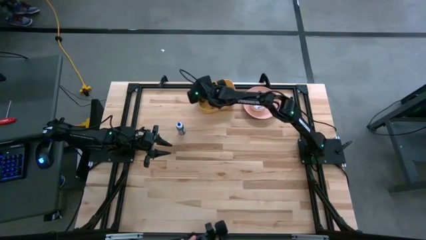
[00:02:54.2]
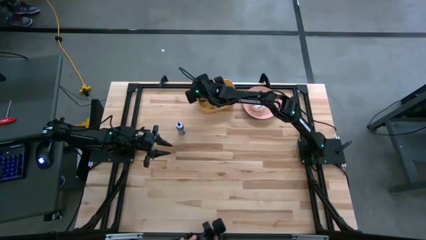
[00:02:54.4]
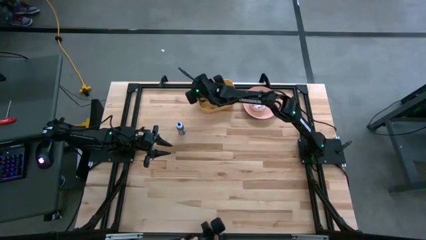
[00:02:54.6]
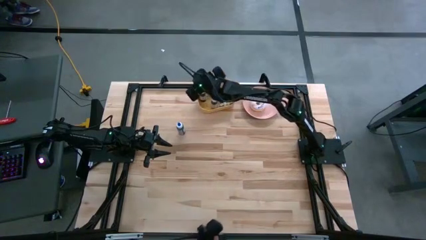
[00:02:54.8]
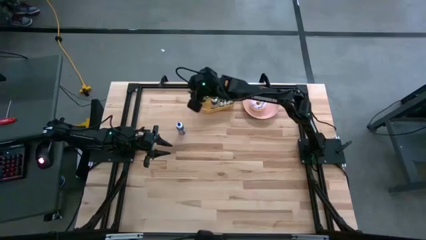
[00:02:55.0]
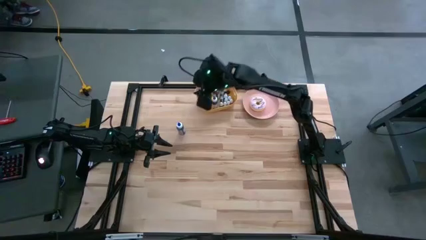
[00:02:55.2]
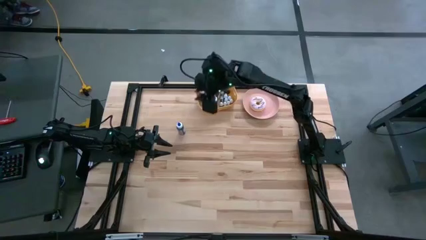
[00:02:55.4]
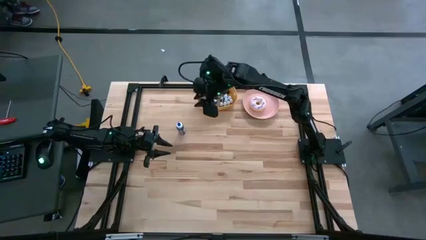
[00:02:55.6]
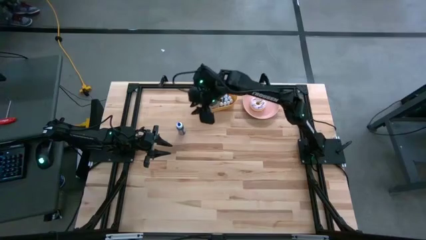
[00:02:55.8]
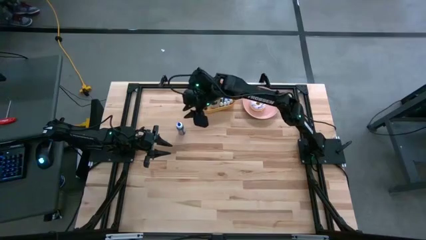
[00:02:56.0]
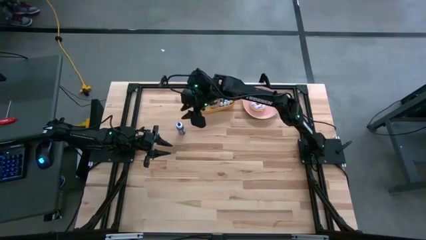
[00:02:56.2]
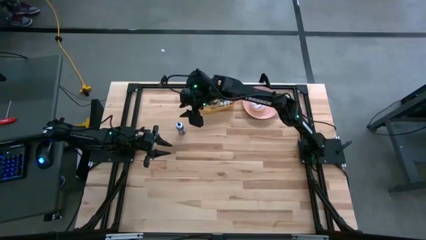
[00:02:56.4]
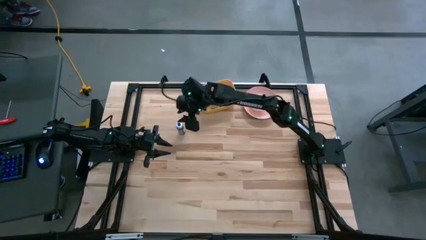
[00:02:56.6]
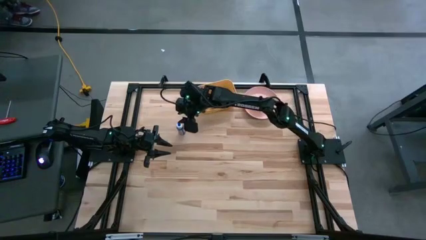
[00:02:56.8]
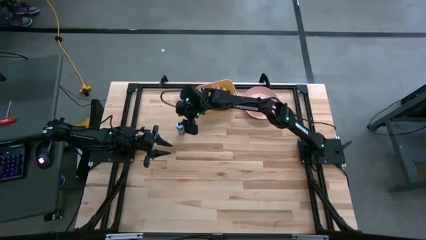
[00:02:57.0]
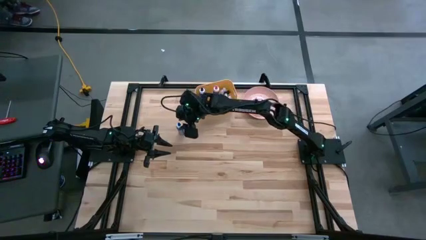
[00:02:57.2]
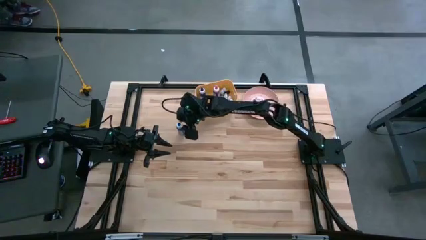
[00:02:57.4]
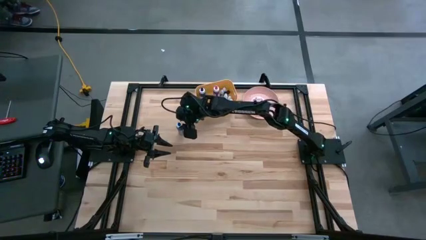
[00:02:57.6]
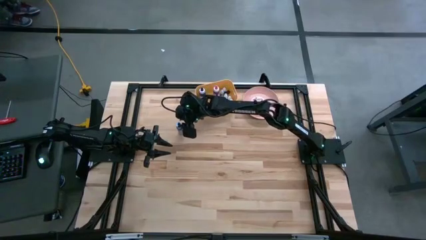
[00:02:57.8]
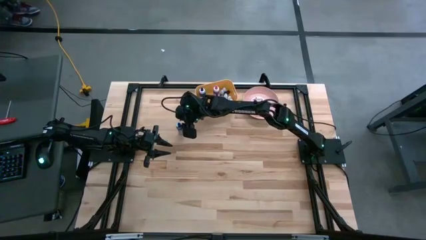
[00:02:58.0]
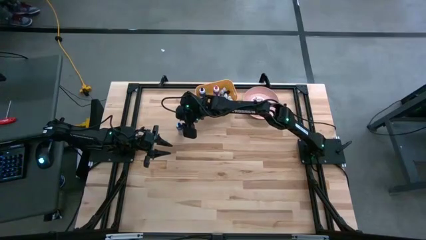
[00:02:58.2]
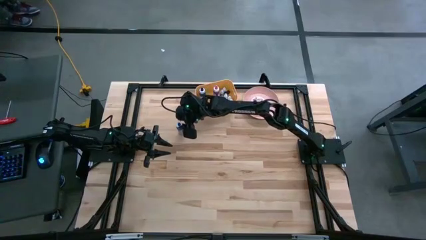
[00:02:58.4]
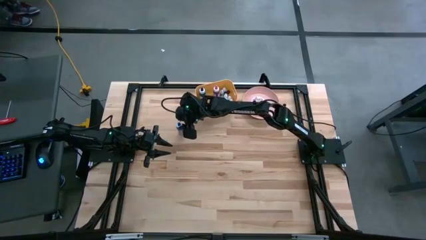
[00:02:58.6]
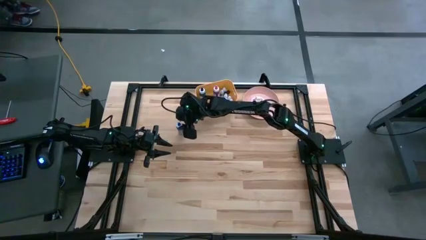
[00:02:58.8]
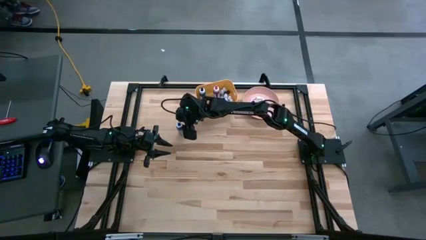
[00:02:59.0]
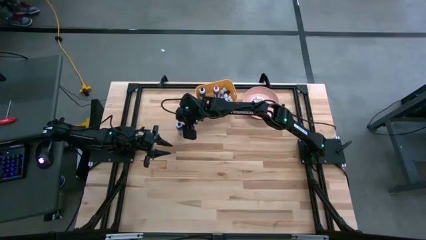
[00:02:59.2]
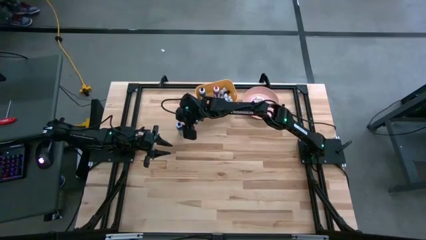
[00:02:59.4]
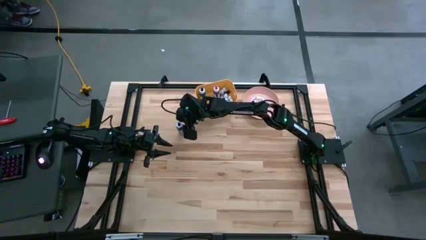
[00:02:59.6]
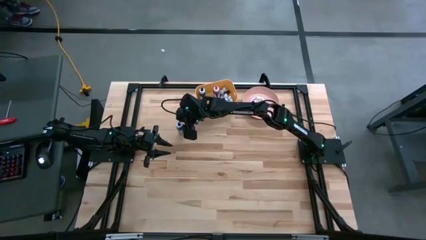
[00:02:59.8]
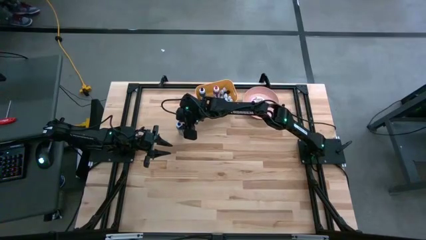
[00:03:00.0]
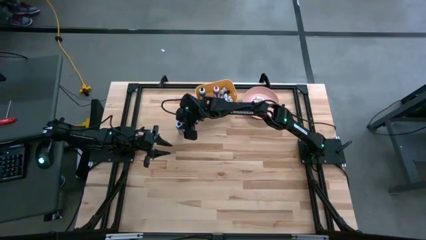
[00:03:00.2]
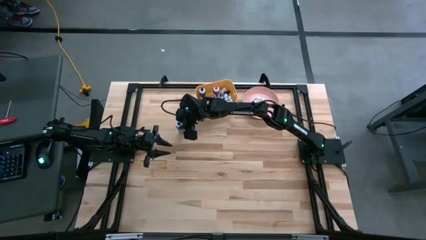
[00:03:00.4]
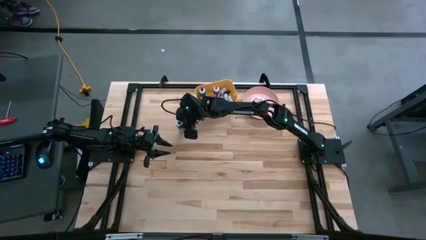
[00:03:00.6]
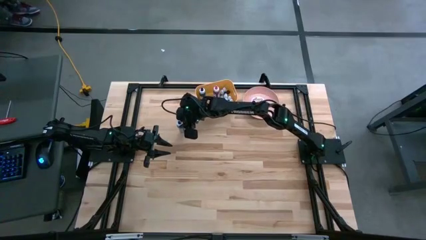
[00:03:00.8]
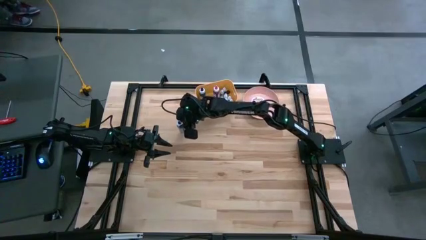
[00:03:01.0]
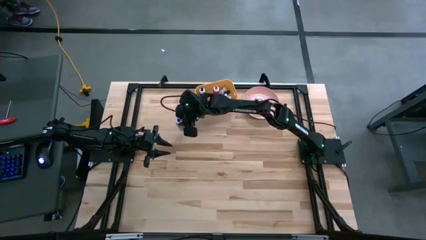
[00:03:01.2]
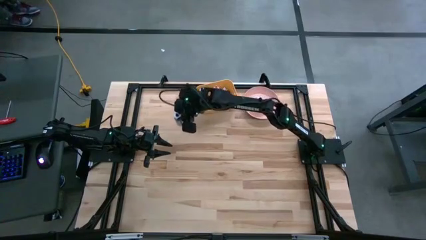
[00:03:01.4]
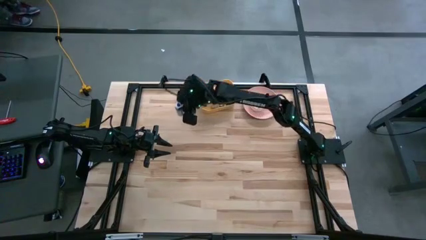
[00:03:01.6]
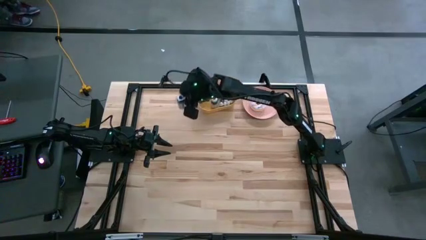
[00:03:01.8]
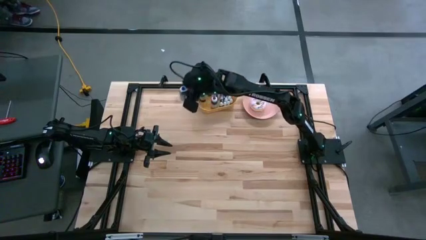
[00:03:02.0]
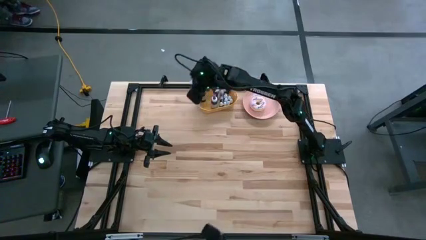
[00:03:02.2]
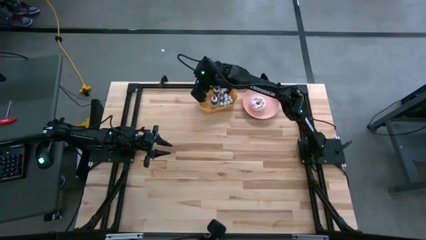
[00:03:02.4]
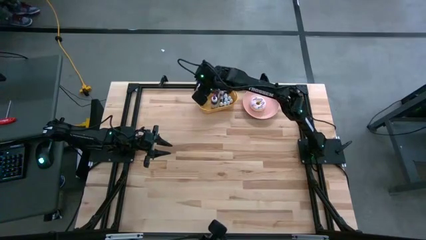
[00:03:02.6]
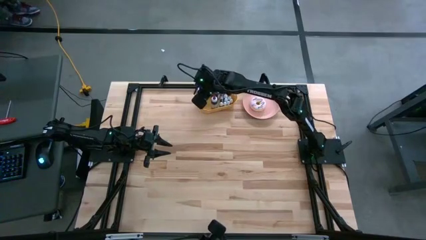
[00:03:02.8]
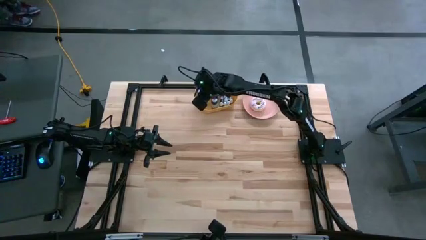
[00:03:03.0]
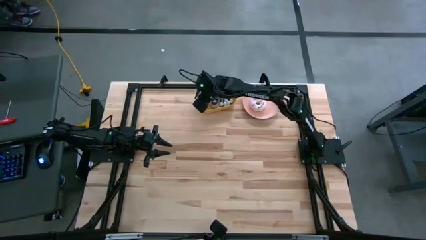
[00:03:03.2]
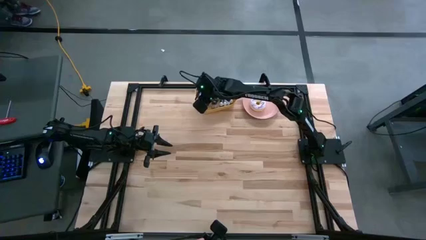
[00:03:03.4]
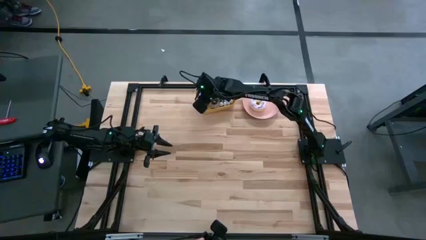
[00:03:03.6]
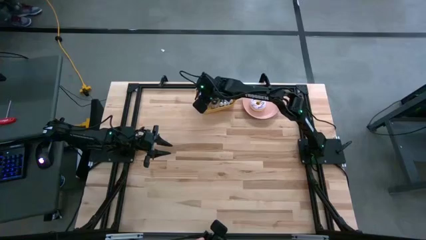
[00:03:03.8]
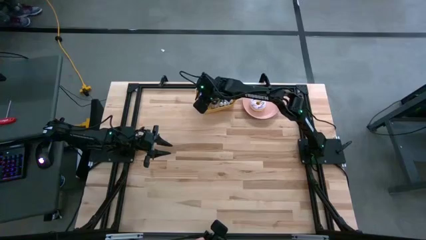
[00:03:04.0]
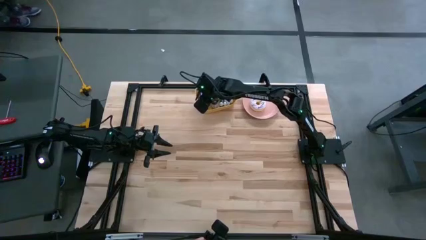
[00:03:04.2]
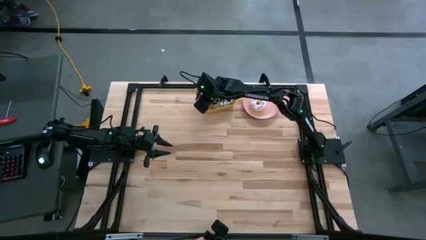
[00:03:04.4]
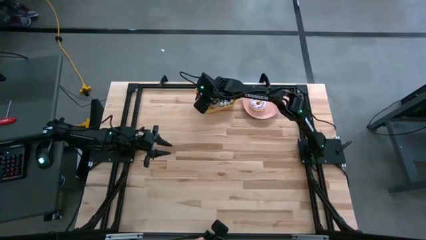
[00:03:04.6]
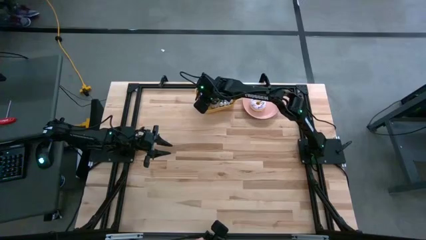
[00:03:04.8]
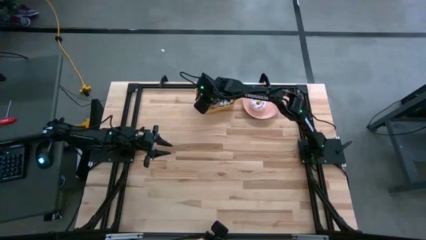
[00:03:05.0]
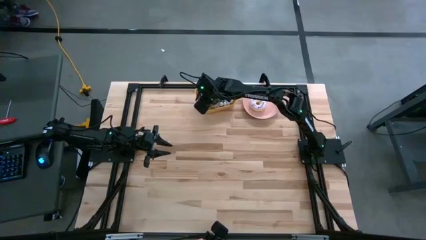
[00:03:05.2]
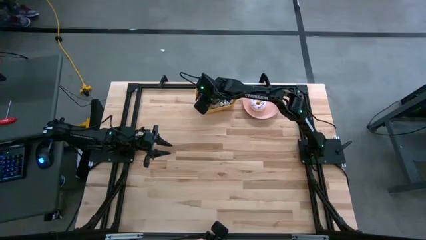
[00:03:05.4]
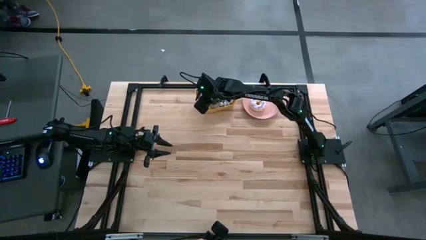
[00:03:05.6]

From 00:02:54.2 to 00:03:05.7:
Task: Pick & Place food coloring
Put the large blue food coloring bottle into the yellow bin

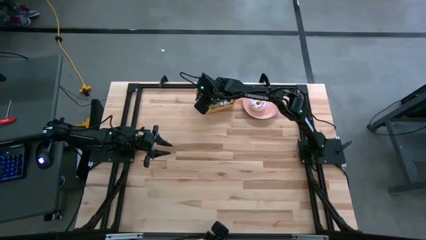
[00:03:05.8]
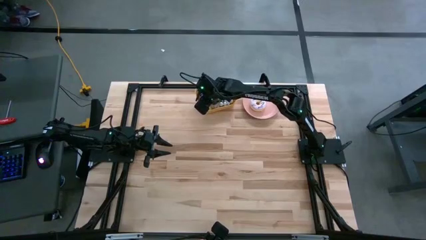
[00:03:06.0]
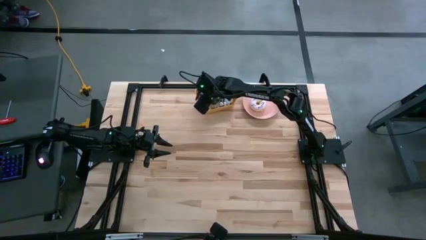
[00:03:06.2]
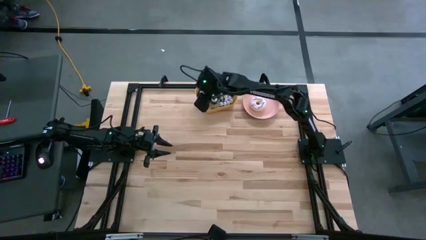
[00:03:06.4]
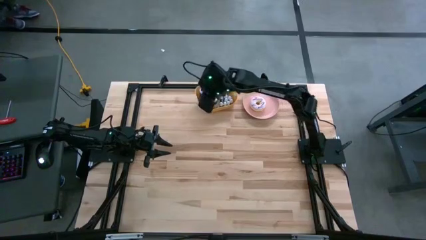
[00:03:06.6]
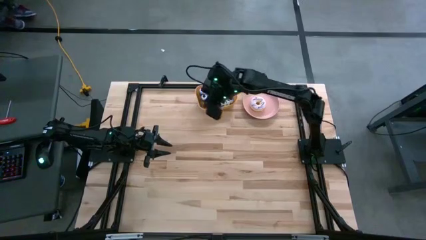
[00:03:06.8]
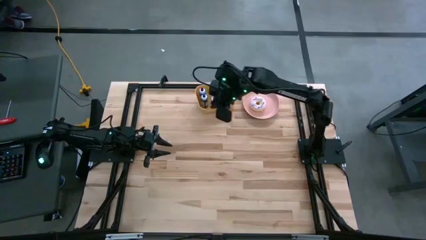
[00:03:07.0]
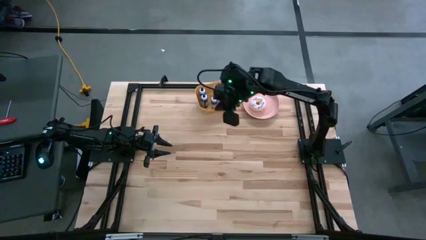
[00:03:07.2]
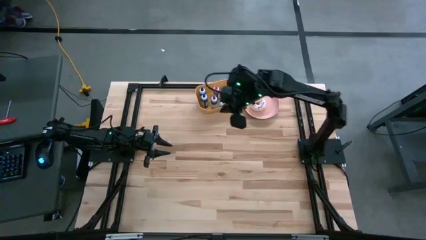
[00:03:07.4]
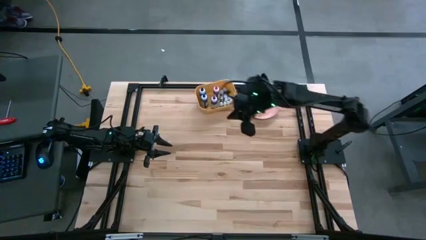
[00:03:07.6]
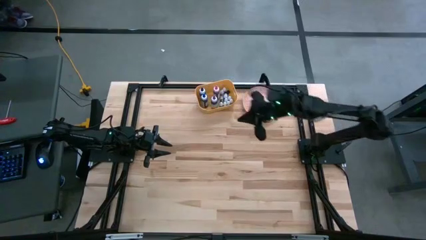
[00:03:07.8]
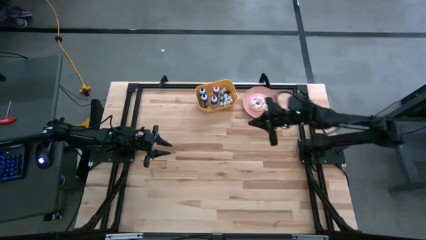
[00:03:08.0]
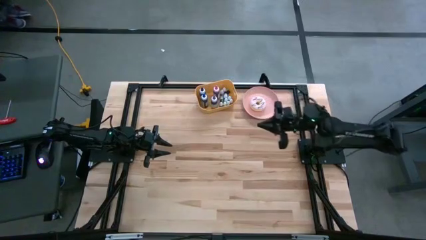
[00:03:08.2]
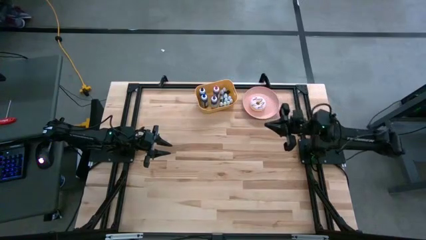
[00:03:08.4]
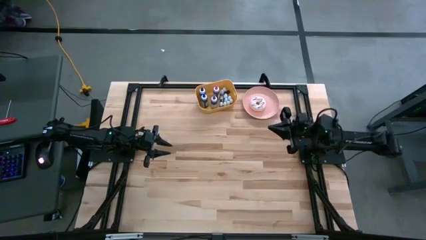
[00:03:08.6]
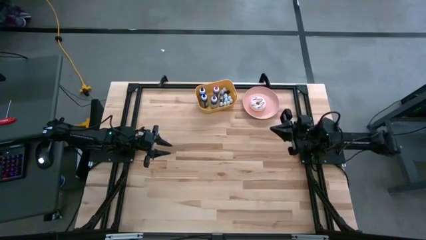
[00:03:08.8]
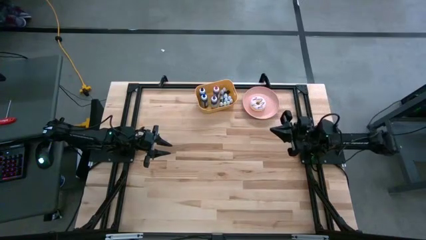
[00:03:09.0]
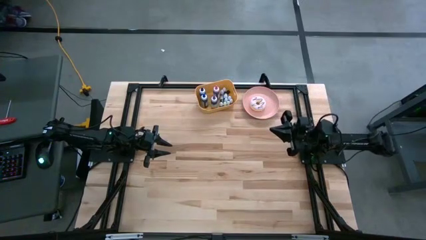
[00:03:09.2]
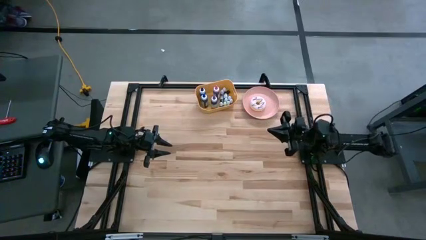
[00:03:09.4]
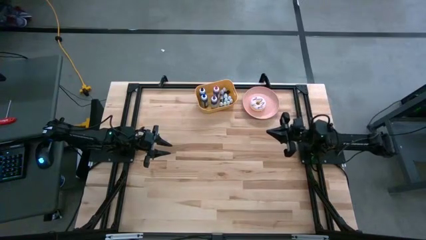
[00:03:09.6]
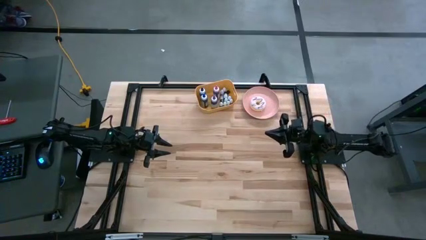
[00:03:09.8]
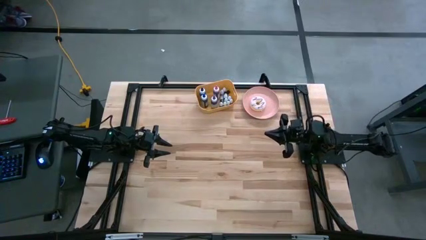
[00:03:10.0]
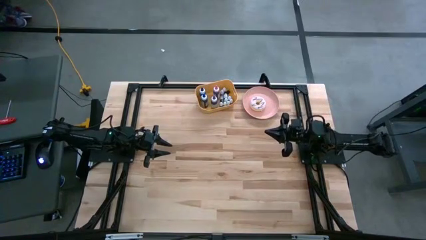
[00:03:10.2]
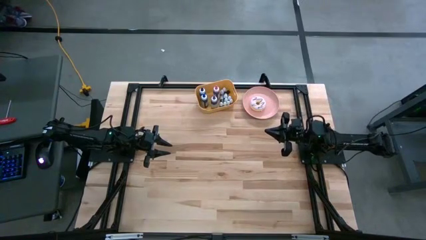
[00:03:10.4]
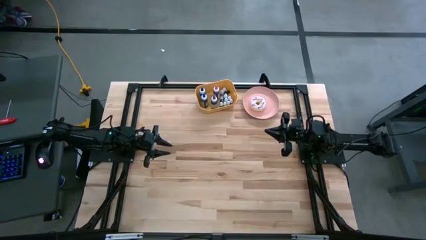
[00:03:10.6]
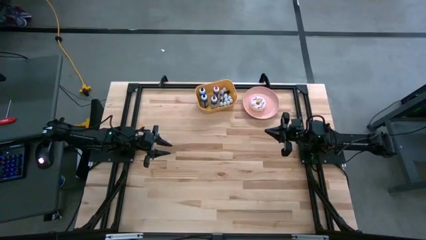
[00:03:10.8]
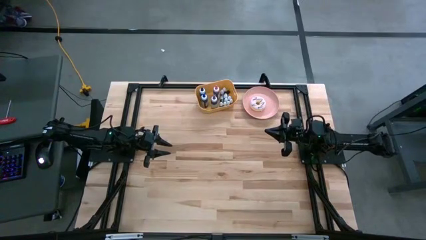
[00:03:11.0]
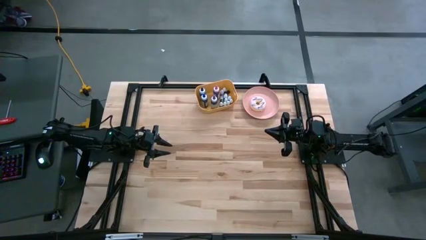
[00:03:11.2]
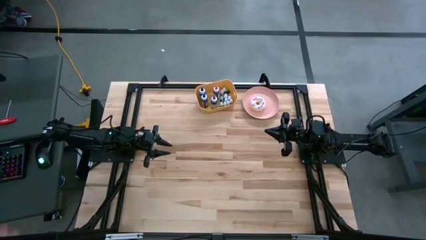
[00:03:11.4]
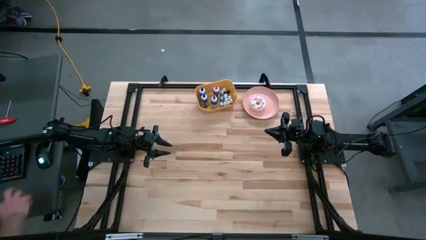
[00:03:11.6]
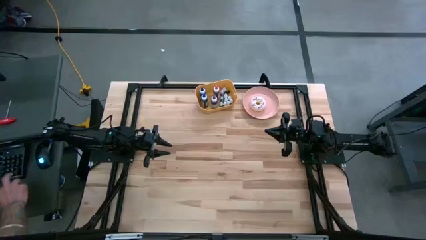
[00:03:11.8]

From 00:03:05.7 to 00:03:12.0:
Return to Home Position
